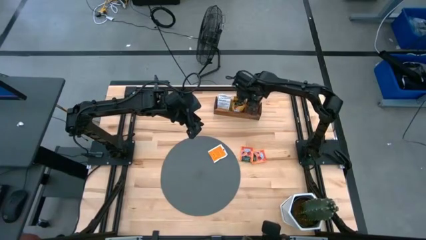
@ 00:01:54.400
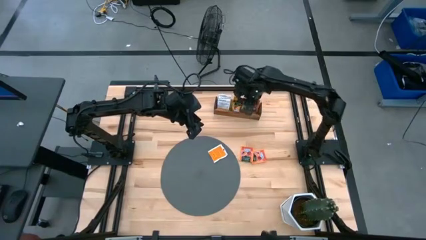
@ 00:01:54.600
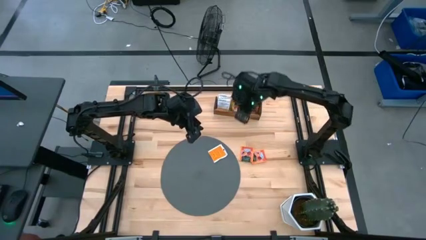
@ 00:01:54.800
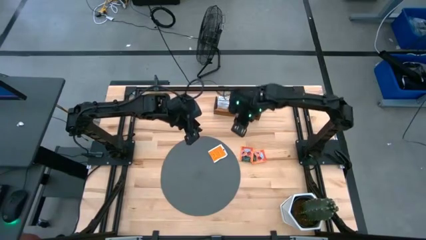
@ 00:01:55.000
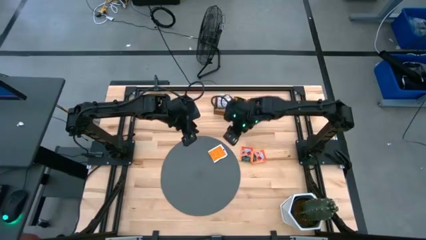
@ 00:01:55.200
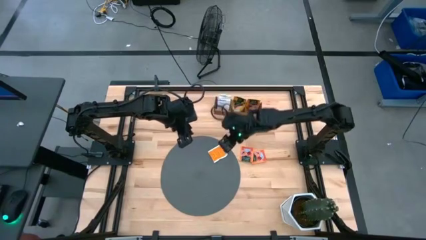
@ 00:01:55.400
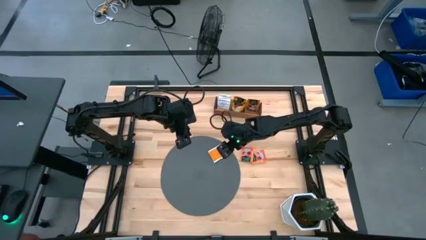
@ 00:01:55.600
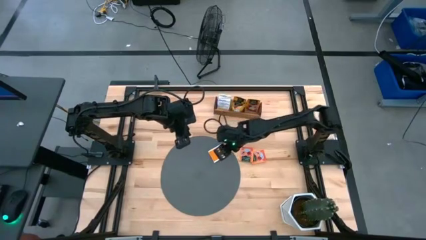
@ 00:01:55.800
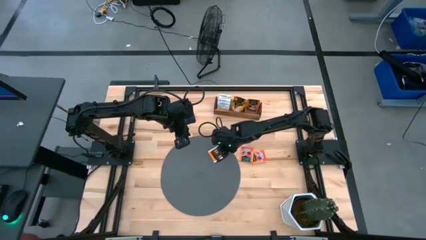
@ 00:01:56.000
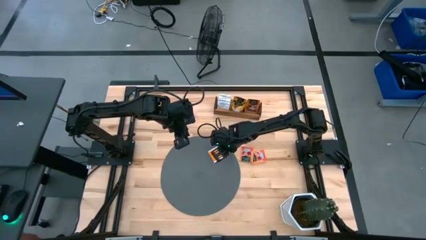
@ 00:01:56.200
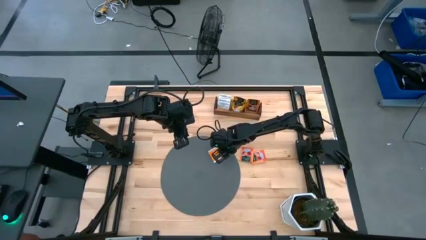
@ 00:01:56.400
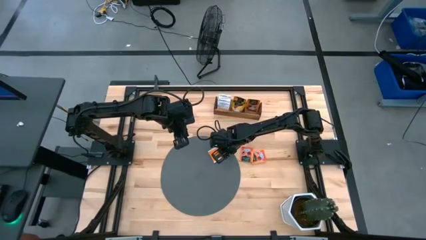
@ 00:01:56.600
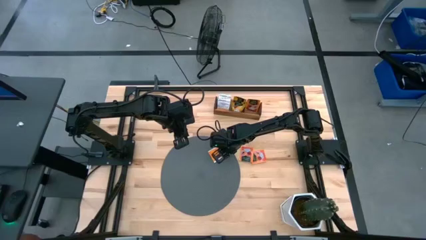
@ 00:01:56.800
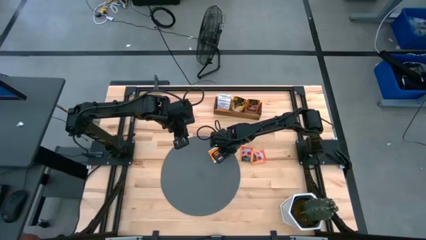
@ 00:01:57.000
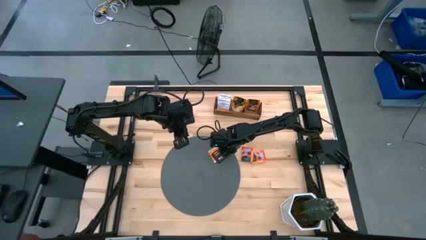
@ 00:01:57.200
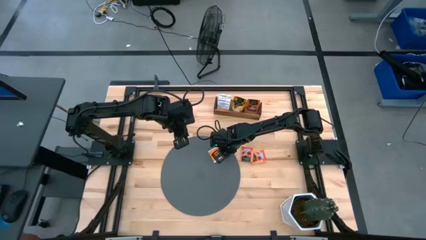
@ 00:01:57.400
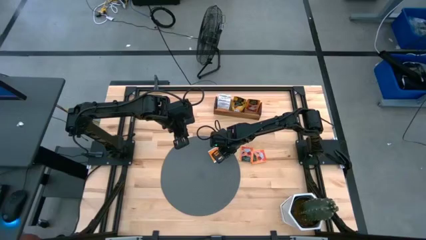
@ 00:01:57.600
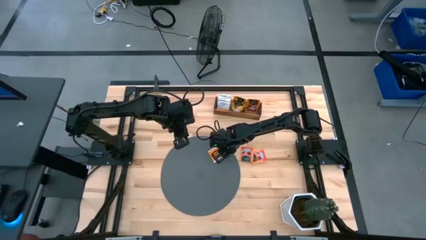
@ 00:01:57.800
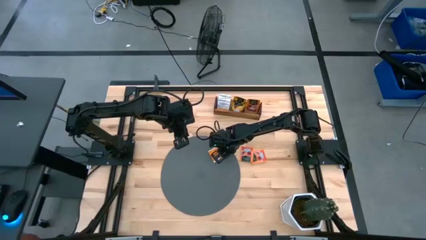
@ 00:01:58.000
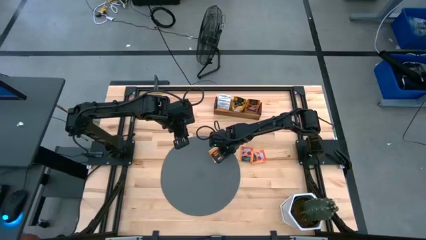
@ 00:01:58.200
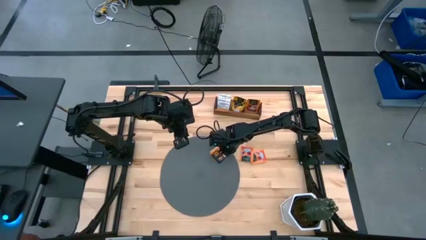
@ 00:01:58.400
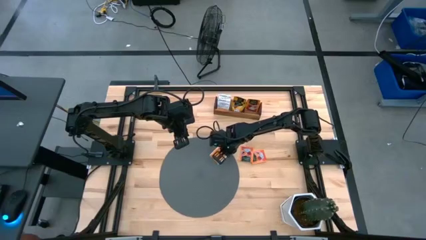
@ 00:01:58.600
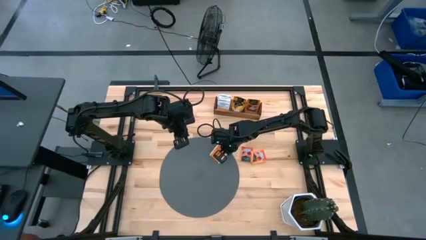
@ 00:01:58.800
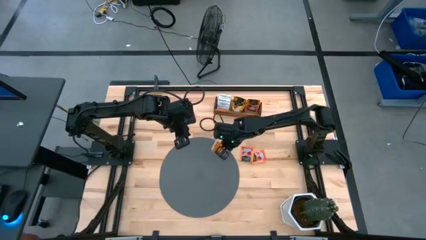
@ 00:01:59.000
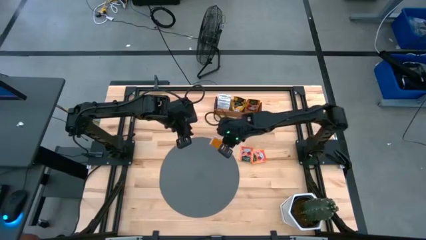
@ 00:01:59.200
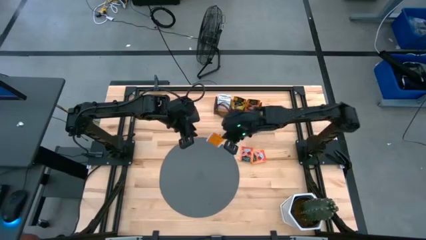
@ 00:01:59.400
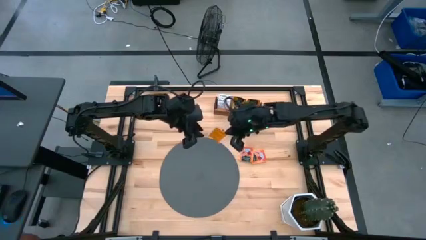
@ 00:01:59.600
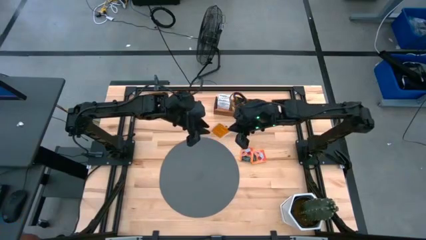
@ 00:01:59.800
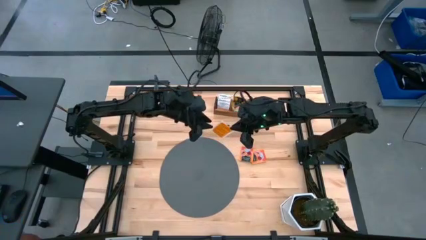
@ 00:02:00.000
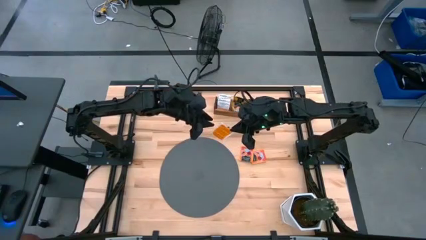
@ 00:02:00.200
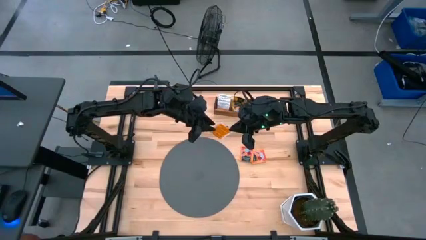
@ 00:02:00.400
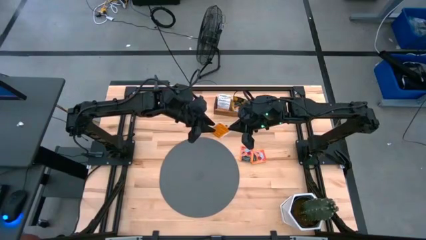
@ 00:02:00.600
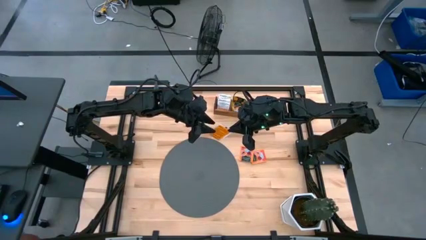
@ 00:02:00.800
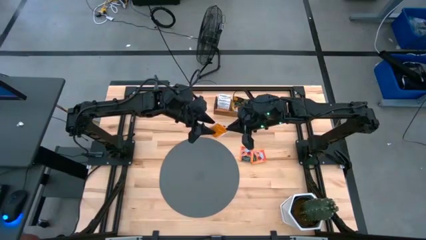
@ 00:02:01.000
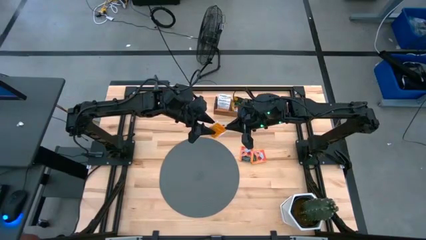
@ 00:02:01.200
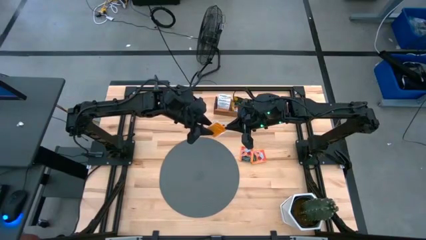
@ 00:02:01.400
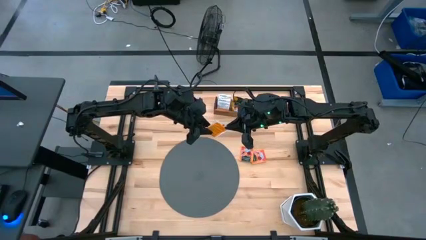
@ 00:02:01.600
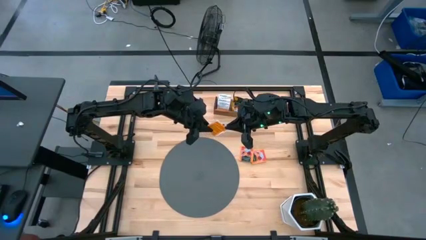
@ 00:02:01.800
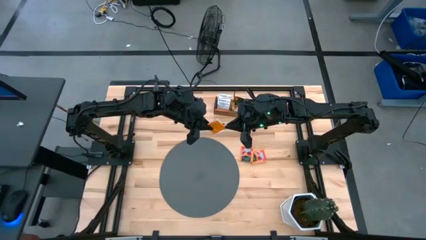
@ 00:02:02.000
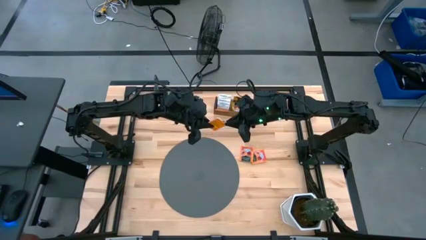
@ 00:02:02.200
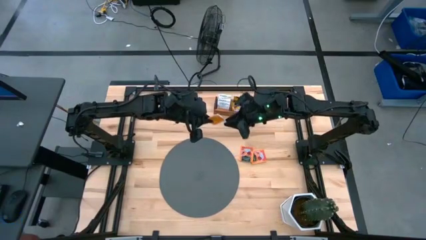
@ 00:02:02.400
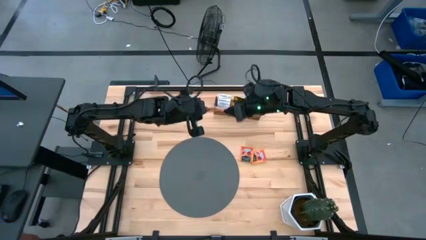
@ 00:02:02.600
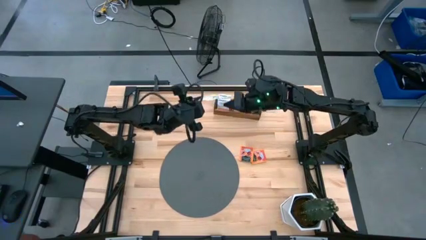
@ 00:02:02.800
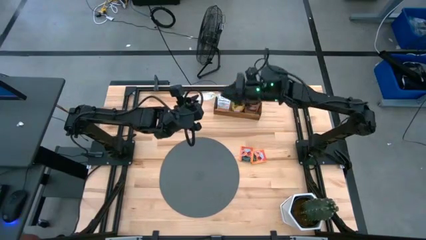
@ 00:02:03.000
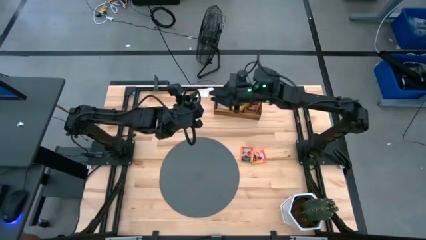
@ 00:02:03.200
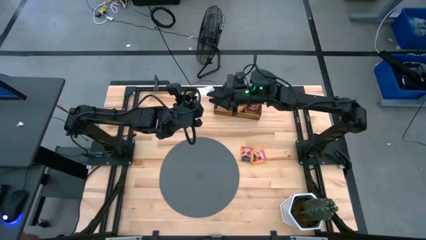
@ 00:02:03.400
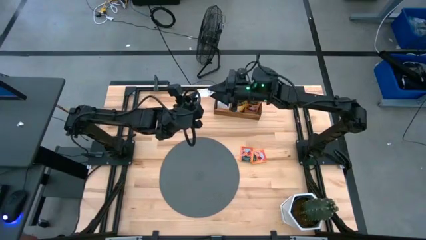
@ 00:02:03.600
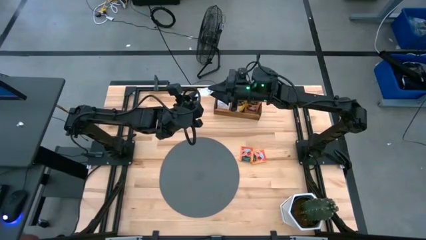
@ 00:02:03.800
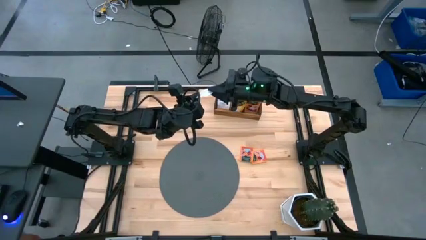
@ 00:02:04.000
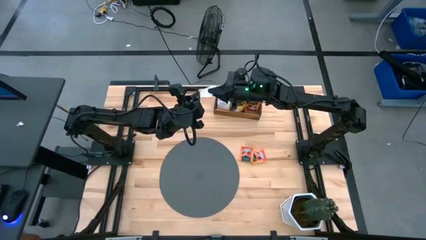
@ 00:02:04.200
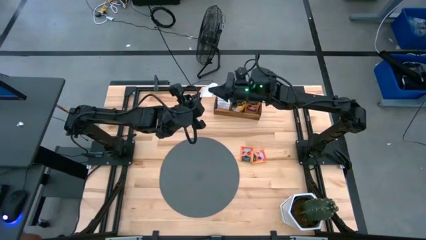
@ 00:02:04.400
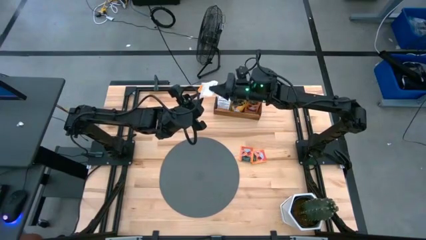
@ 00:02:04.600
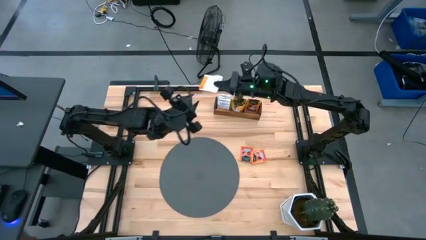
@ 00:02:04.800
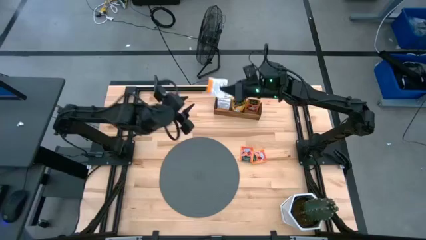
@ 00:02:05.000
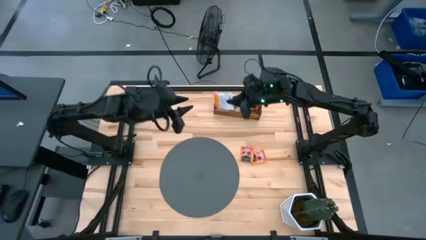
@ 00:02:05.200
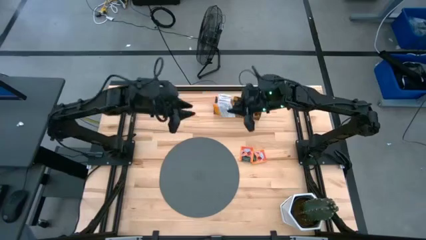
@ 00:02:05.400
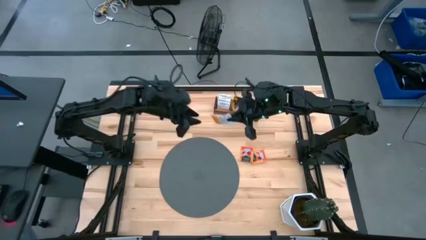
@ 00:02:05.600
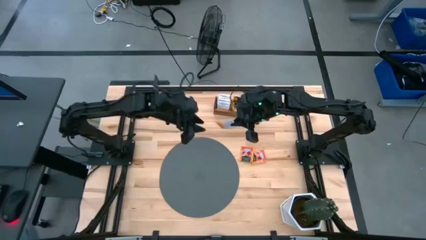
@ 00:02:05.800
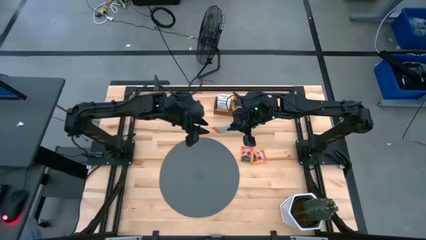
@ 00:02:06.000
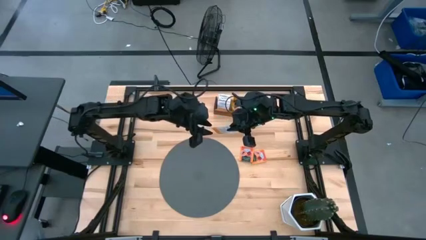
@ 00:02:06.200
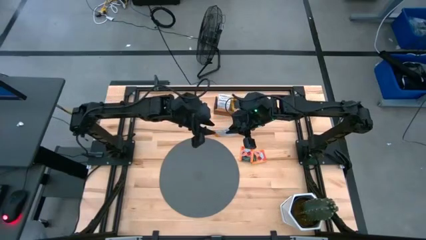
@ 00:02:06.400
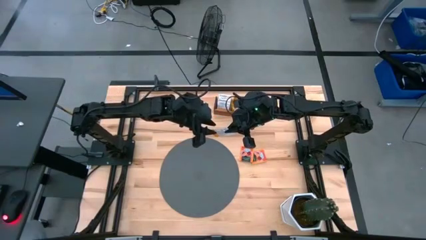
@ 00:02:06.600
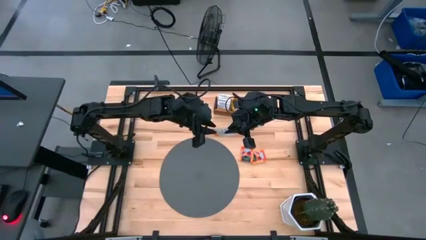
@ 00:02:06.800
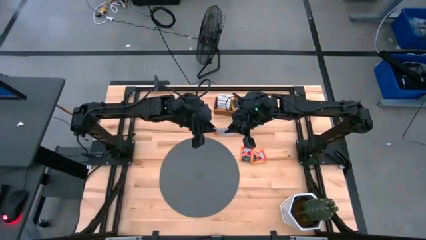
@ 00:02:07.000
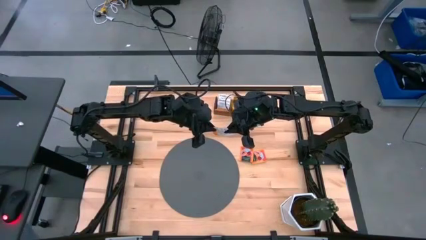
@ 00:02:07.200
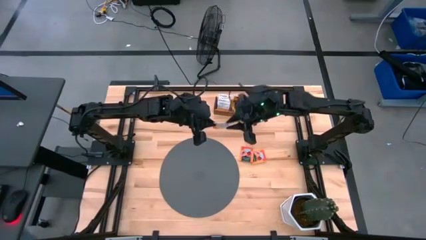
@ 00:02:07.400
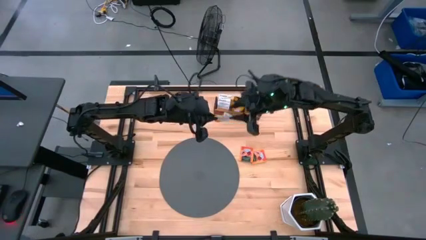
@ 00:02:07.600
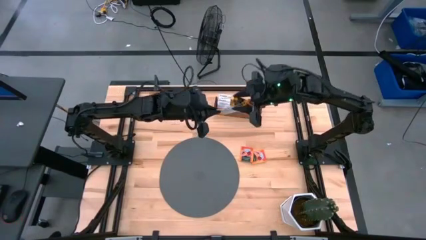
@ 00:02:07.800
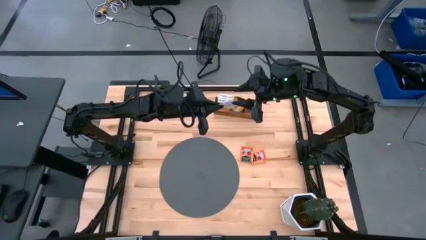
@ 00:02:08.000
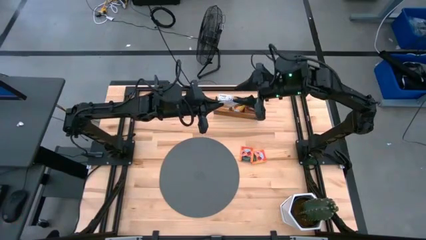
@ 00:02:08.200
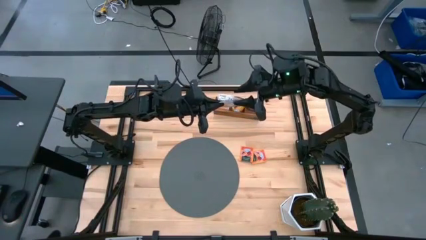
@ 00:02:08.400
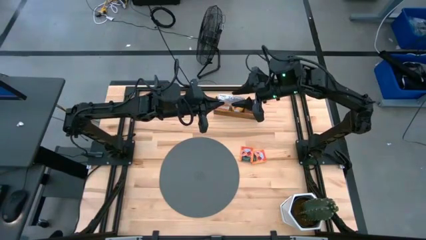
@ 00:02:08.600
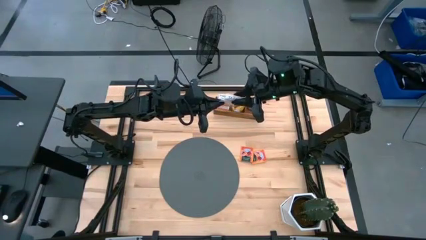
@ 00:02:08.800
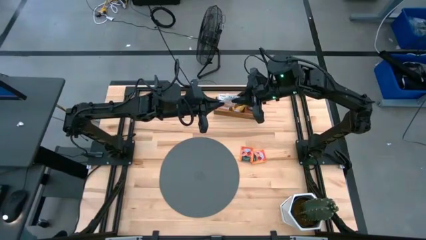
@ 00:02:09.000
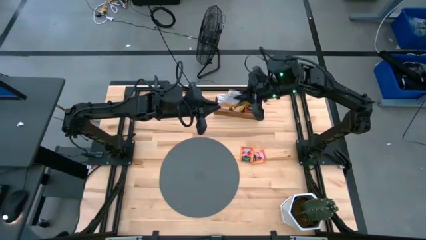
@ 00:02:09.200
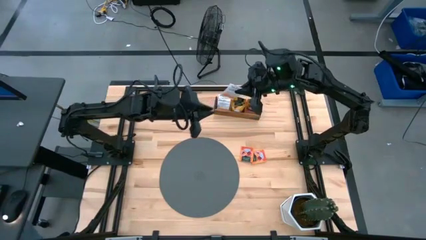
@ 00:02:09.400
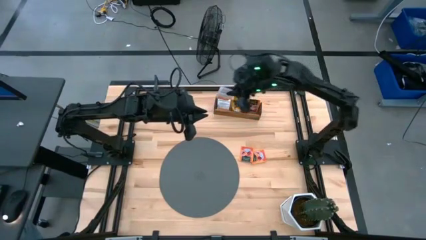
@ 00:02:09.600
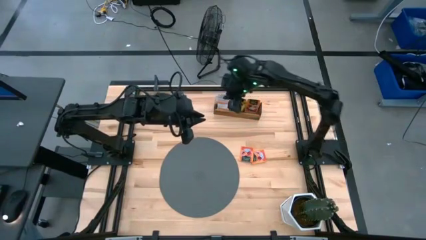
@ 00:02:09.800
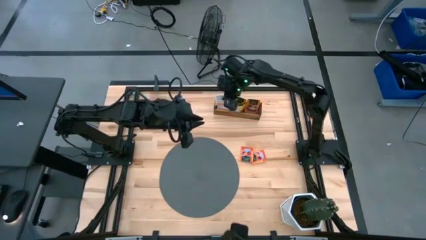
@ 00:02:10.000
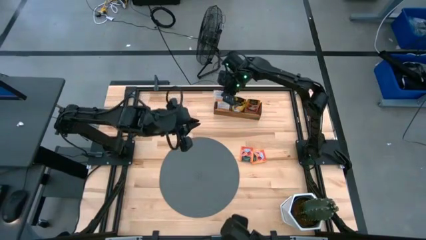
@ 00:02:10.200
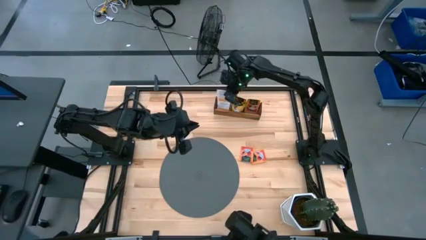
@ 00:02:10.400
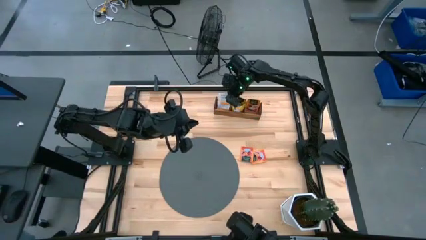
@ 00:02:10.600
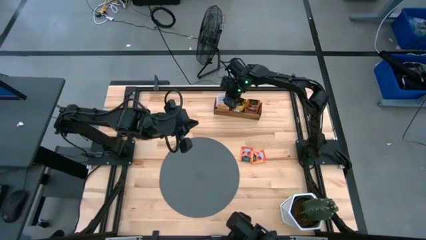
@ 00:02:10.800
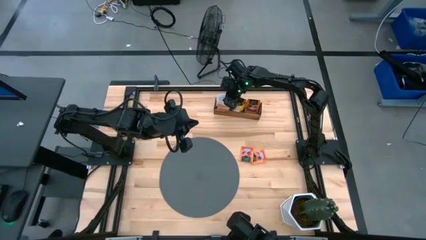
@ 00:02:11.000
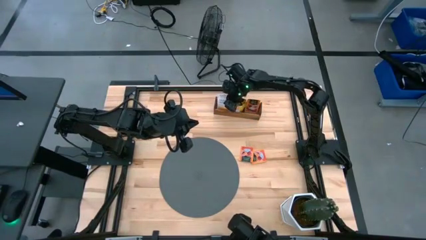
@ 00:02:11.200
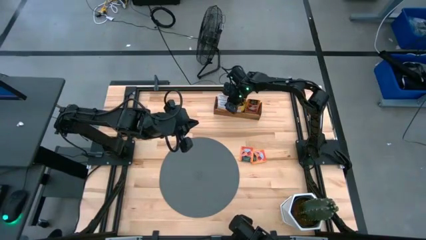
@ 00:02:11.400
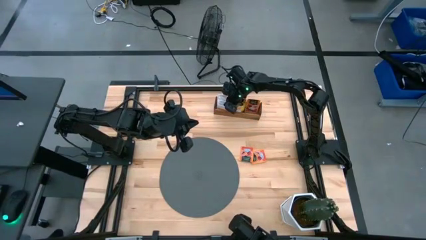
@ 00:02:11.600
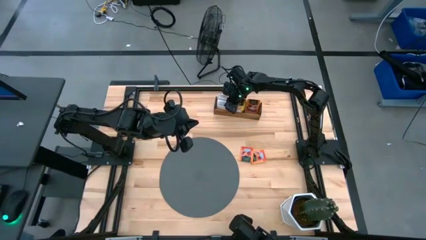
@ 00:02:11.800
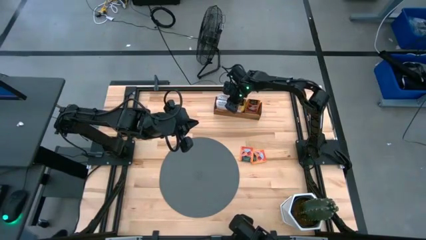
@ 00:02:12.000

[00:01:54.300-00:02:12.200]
Task: Pick & Place Tea
Put the white tea bag into the left section of the wooden organizer
